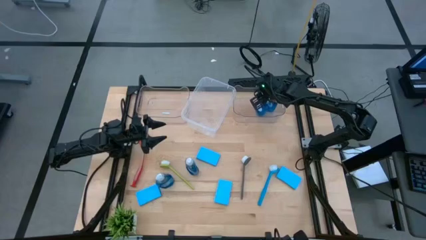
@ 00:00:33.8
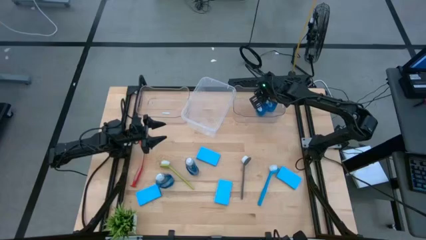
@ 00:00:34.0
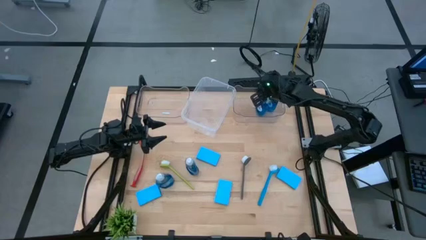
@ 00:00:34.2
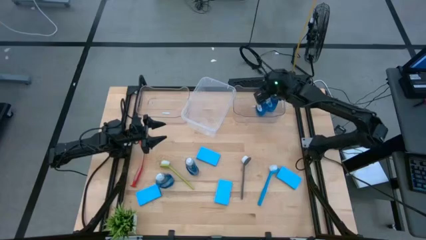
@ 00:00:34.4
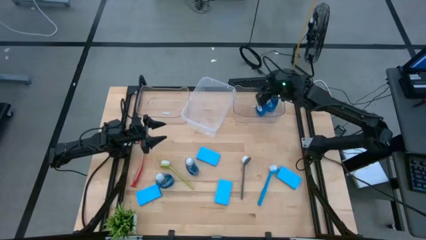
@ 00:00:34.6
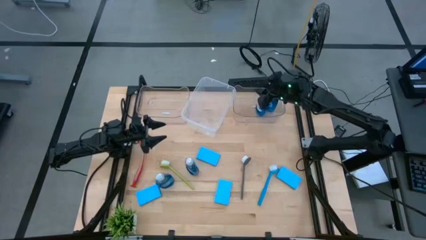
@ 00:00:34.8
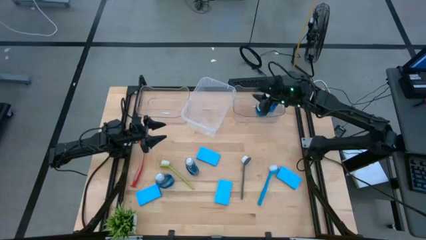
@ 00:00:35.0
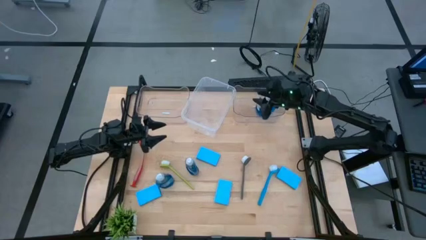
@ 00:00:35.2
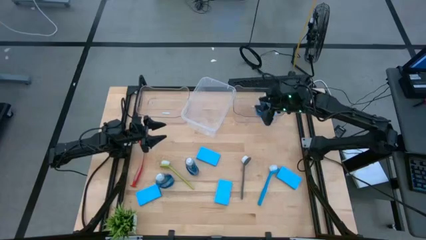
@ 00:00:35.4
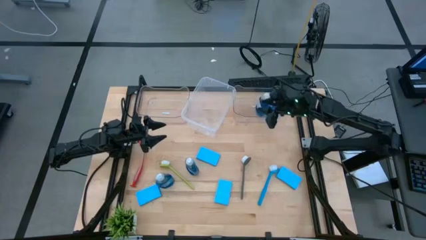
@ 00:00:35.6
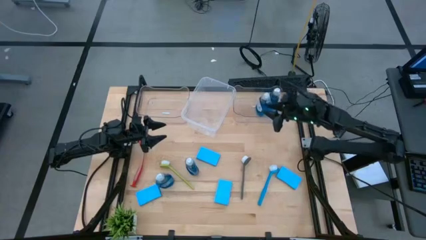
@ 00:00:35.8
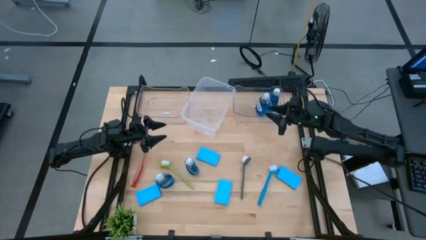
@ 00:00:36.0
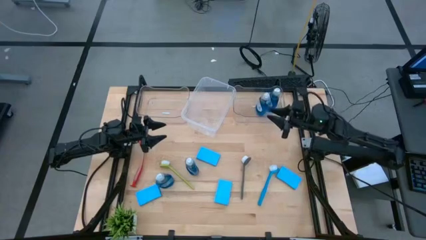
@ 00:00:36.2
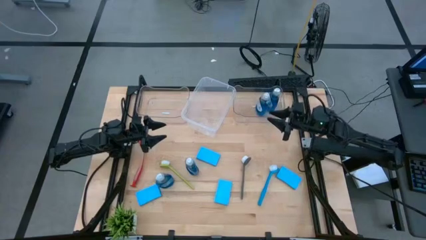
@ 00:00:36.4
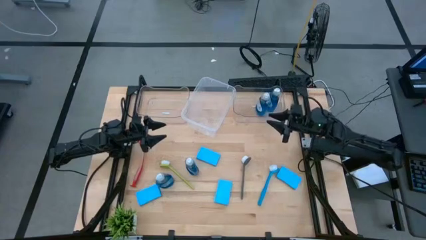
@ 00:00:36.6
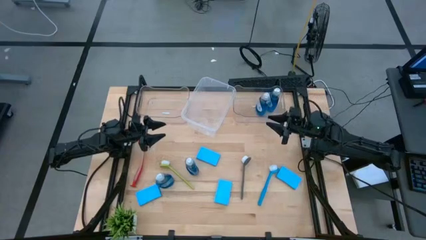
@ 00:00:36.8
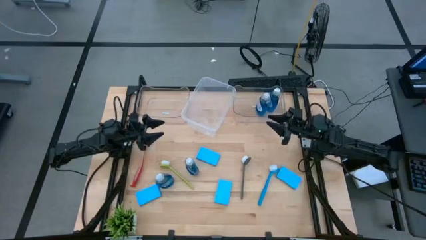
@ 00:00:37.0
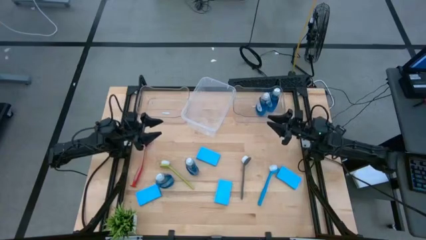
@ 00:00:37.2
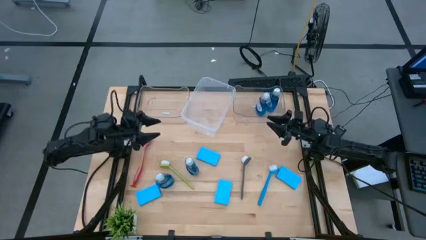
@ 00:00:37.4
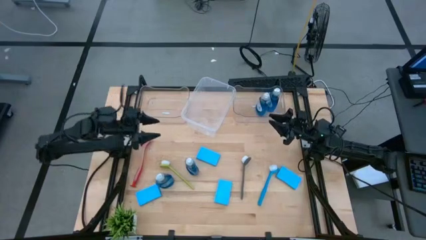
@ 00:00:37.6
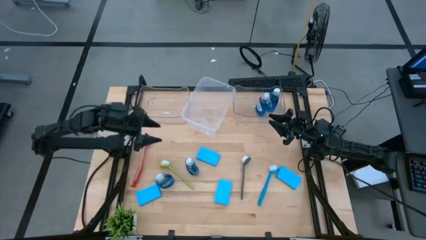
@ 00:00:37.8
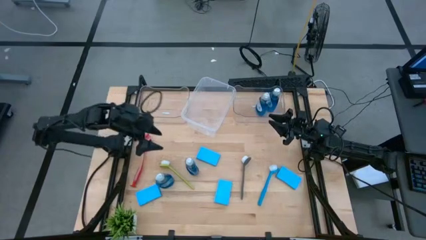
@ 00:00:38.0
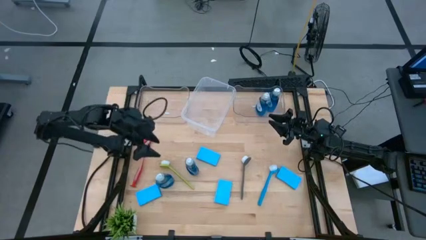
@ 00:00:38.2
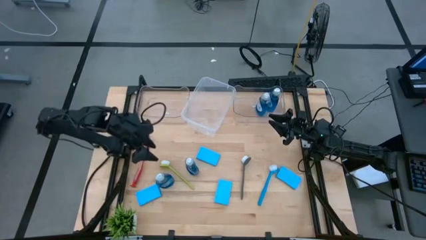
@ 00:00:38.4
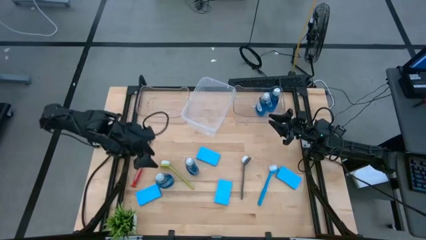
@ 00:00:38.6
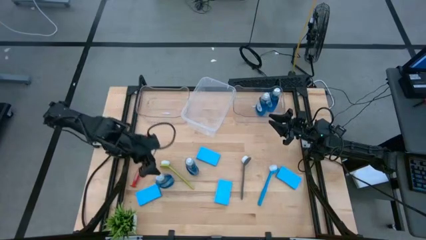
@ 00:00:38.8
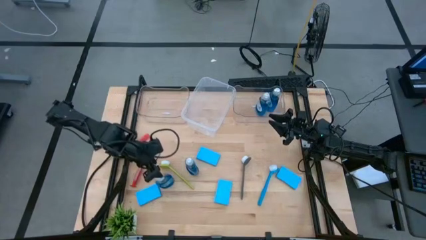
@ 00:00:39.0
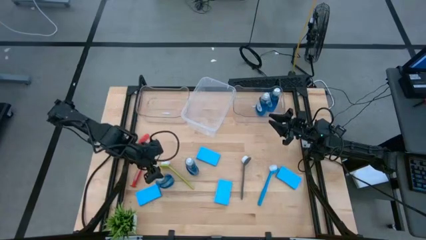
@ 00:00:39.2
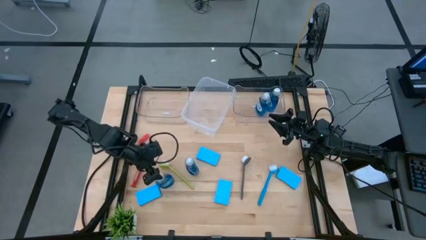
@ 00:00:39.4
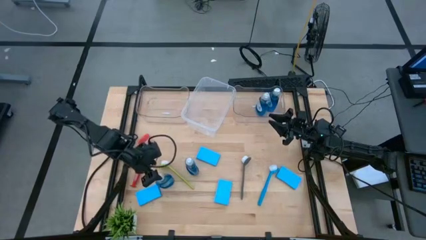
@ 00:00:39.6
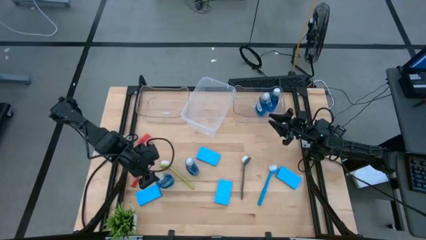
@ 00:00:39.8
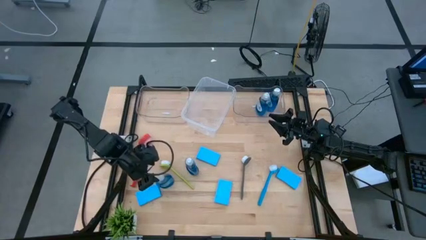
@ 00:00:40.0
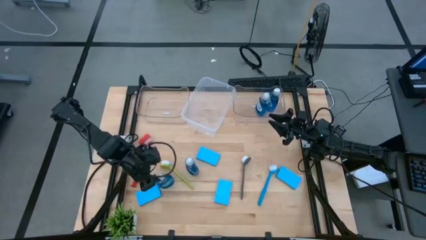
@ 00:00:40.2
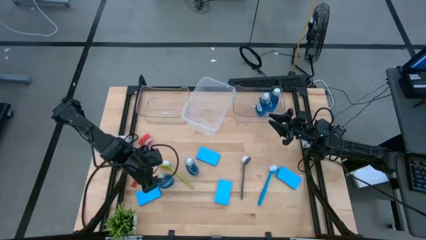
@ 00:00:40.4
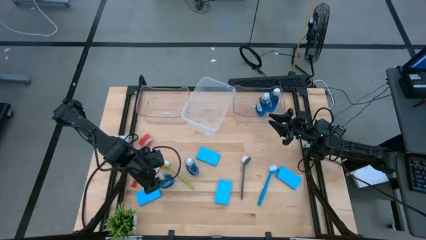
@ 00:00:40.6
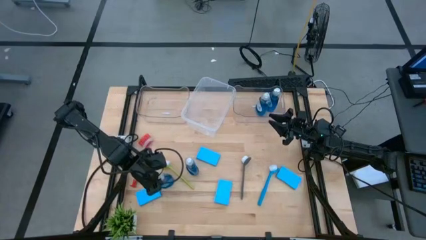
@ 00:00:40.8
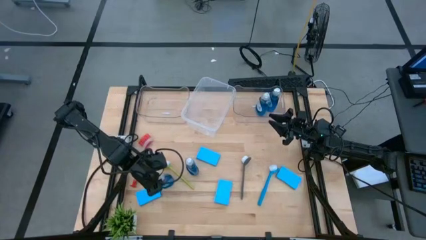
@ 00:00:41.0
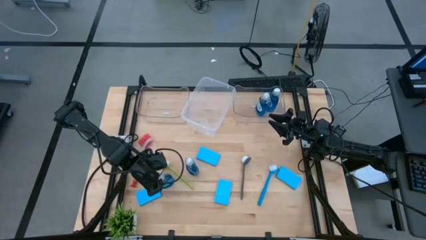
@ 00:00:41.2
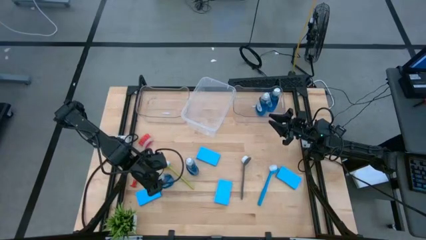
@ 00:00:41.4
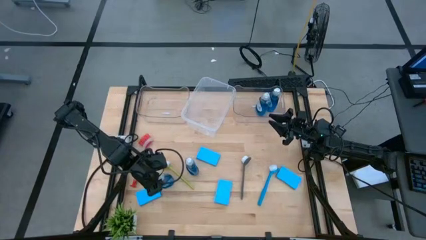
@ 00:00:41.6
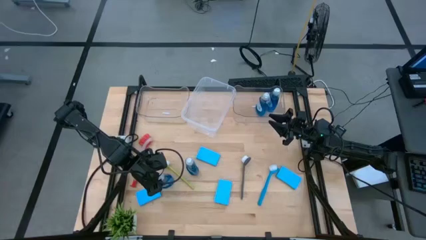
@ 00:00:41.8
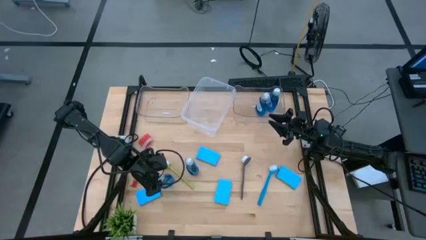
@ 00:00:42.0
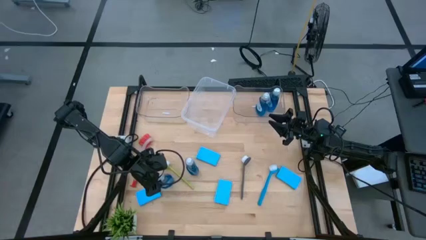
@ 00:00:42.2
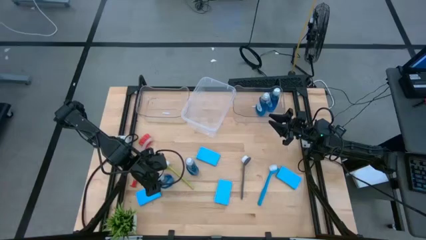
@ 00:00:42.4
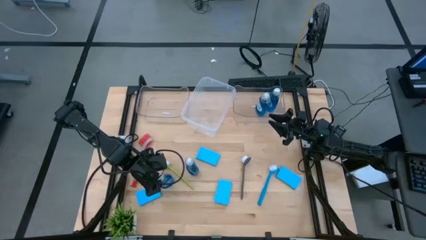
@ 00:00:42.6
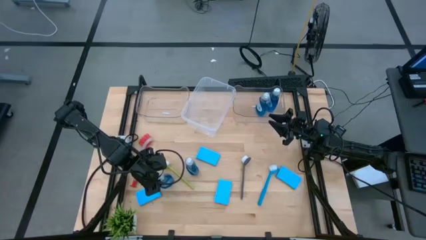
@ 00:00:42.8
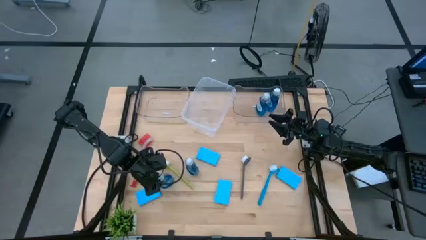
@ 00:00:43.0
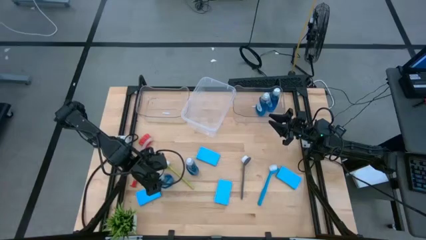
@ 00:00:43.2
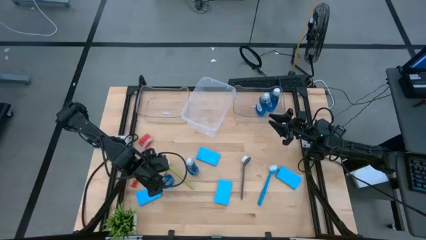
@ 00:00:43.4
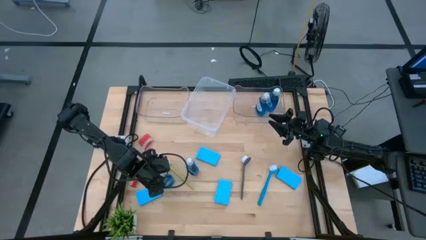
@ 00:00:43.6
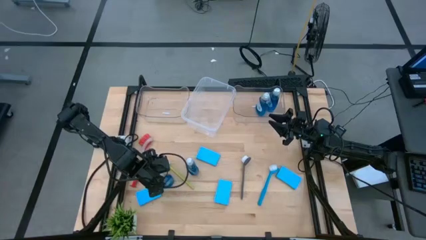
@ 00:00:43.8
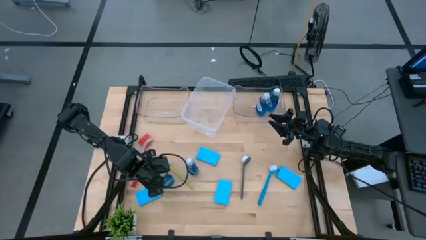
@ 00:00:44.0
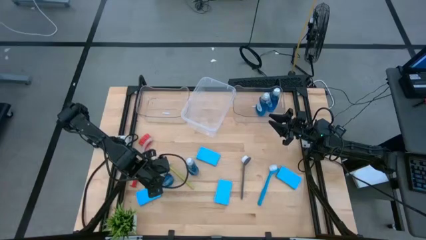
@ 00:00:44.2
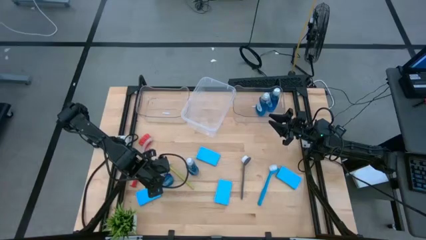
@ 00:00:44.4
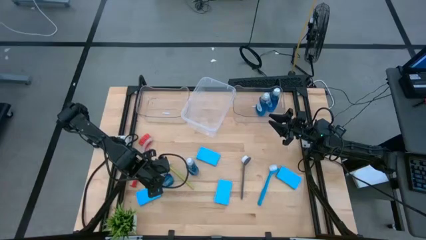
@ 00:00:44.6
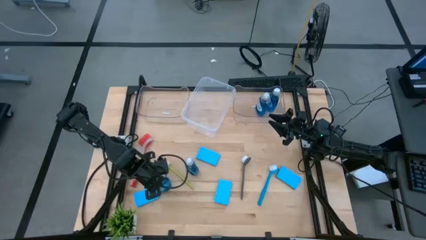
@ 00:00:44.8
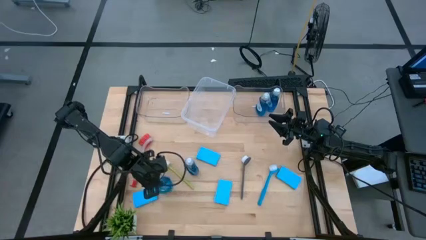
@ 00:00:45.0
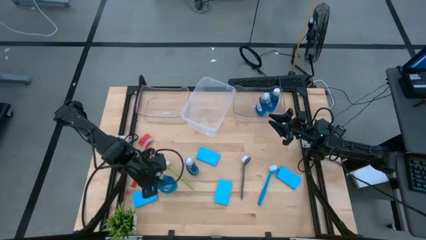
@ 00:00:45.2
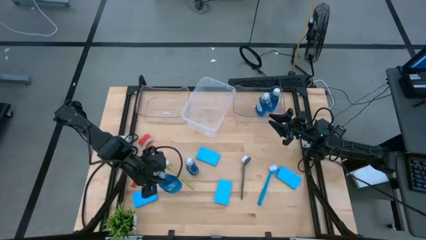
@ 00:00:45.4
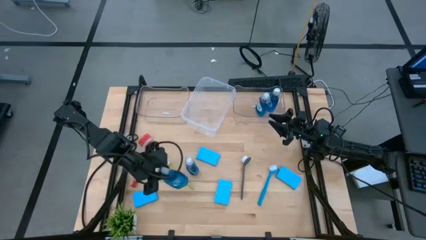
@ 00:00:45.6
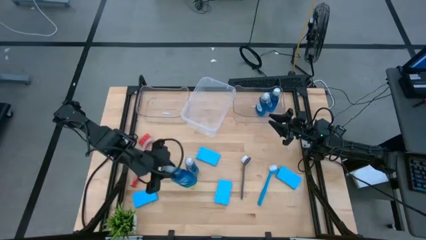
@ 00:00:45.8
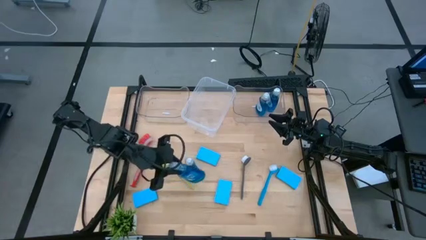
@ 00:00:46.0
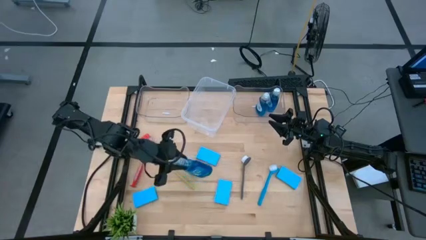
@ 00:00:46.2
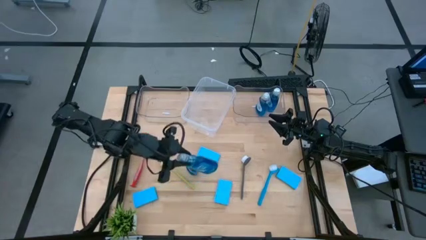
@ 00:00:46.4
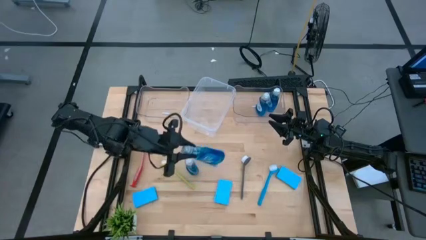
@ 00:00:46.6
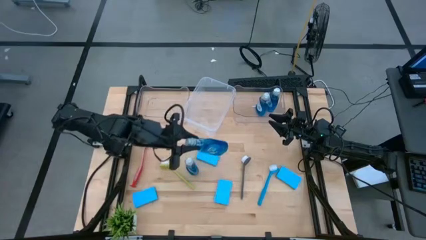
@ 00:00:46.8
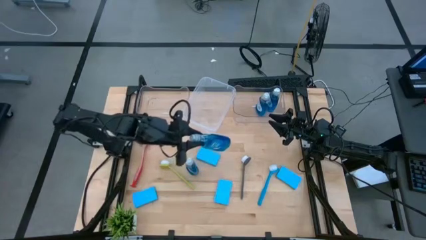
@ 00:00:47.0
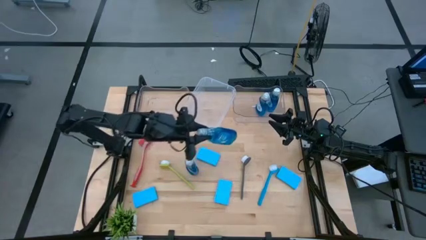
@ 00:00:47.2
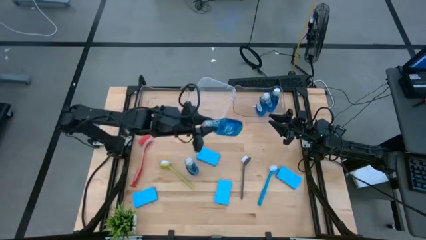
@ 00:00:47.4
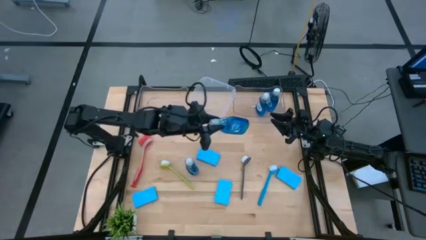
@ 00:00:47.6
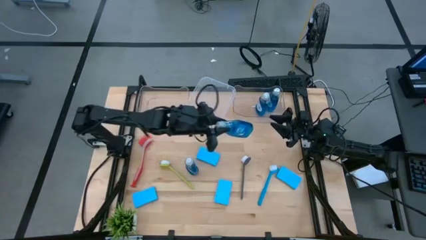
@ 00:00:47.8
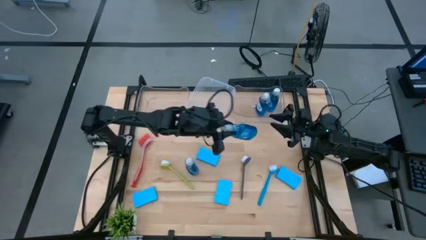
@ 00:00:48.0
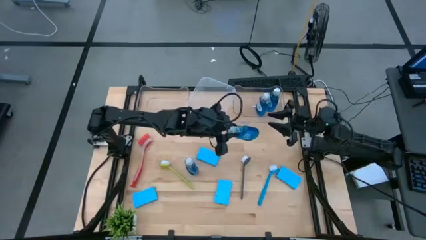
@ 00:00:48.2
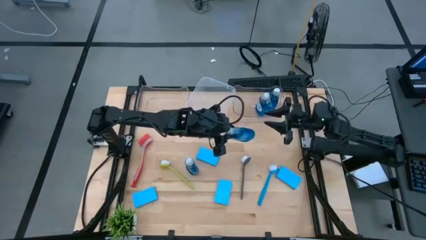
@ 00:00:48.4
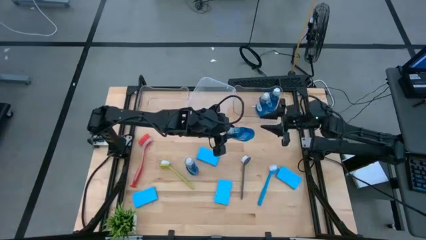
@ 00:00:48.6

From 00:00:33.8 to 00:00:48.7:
Task: Pick & Place Kitchen Sink Supplies
Put the blue dish soap into the right transparent bin
